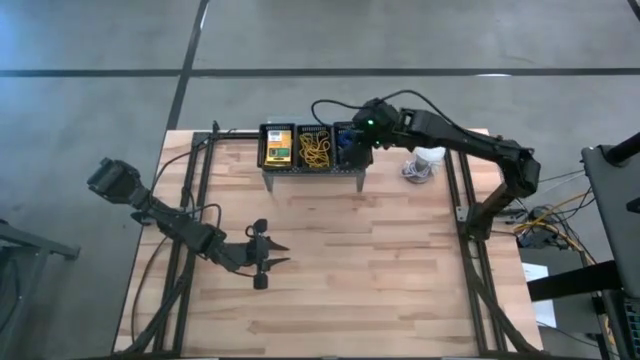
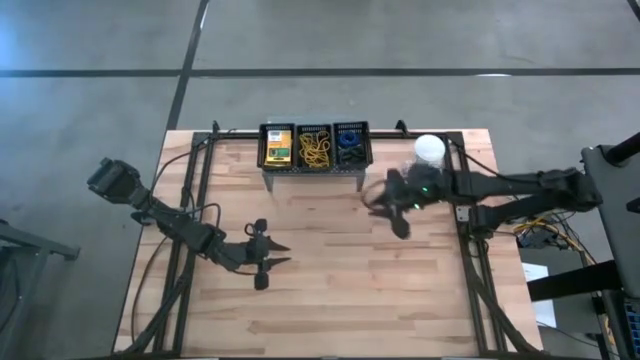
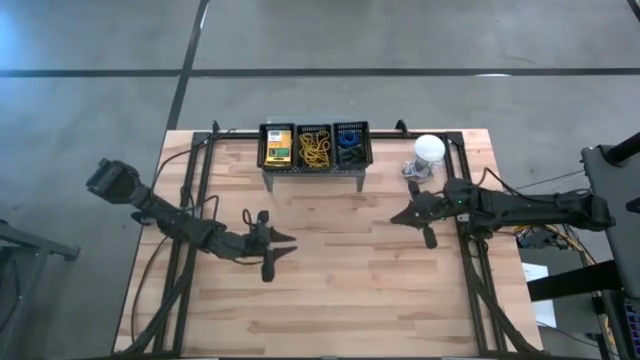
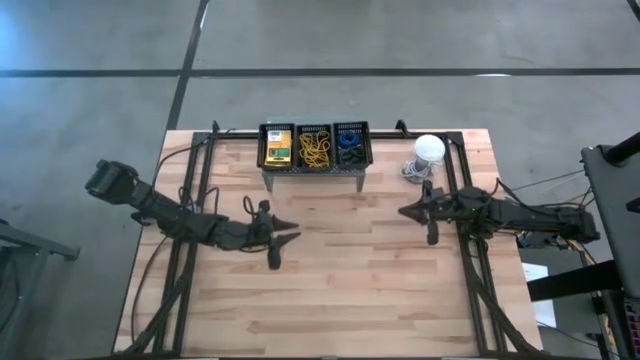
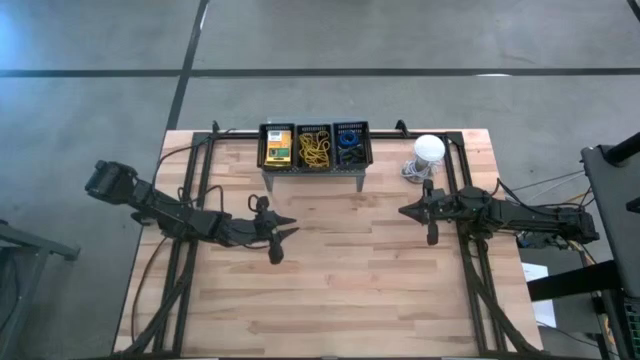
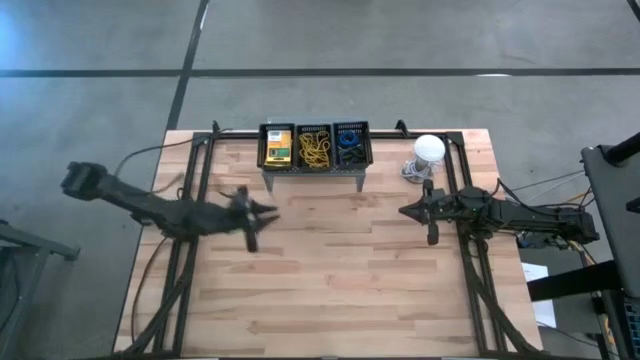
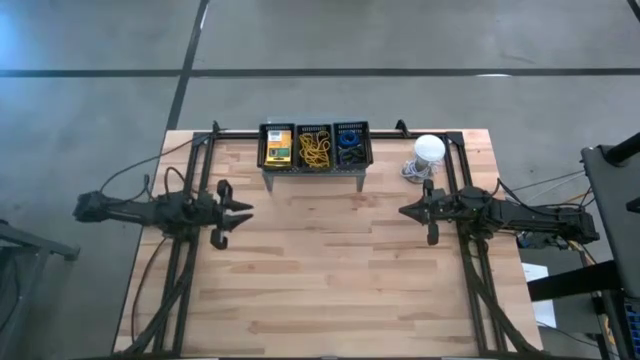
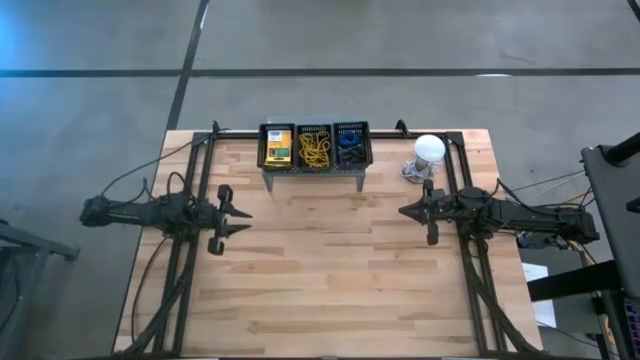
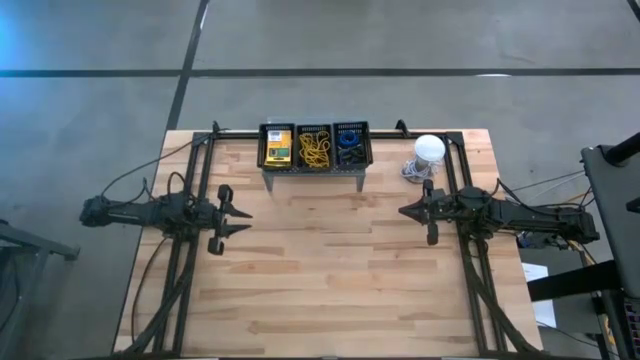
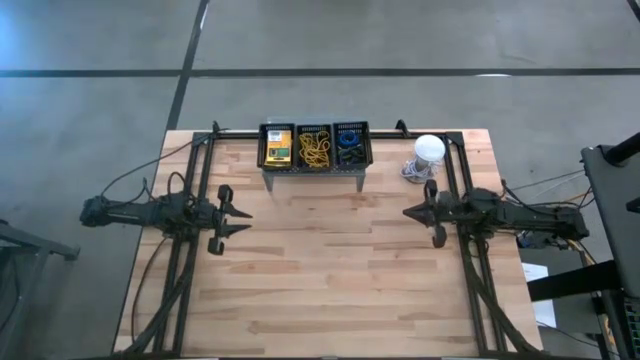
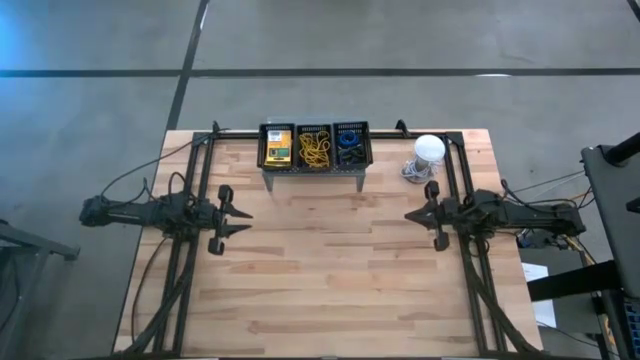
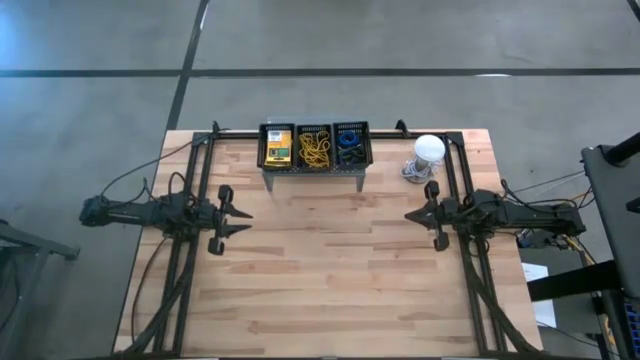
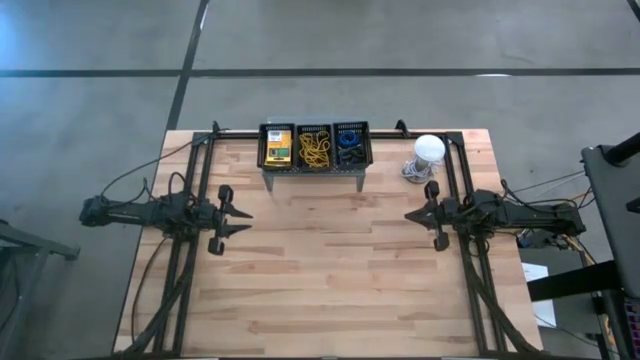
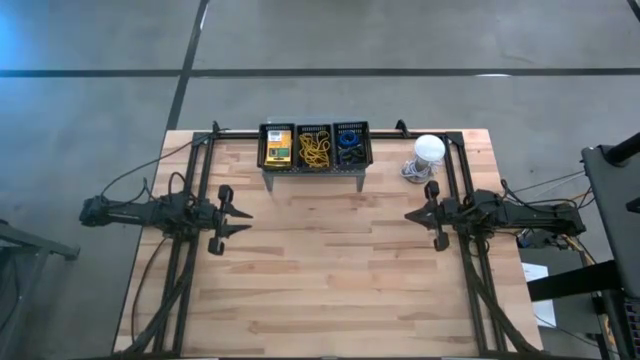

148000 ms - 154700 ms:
Task: Pick & Place Office Desk Supplies
Return to Home Position

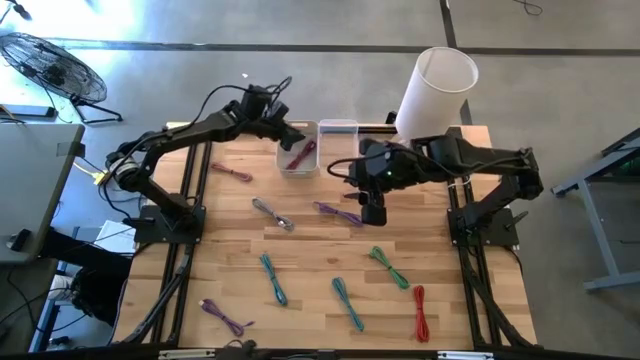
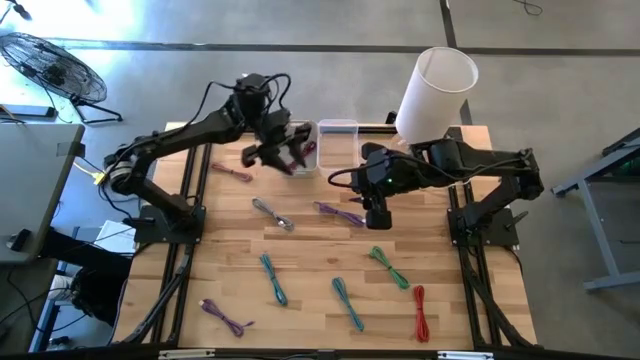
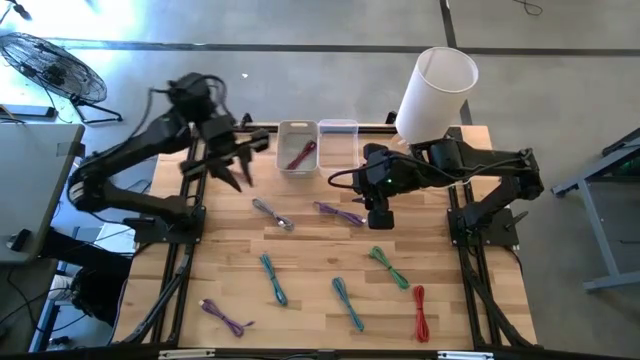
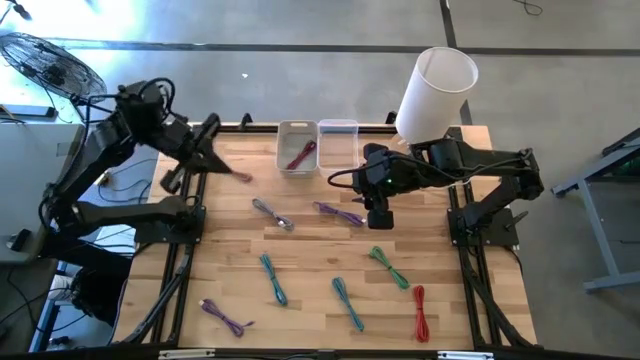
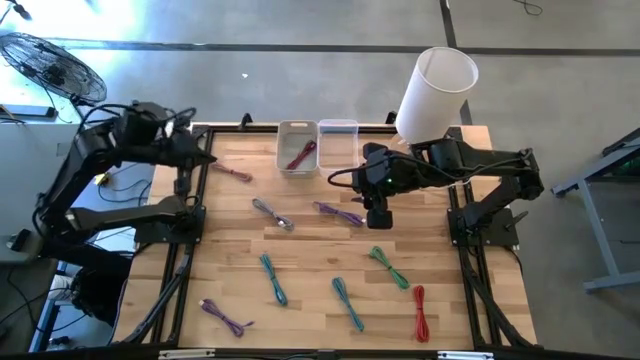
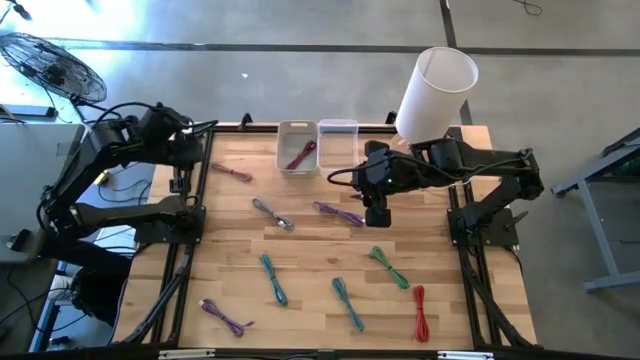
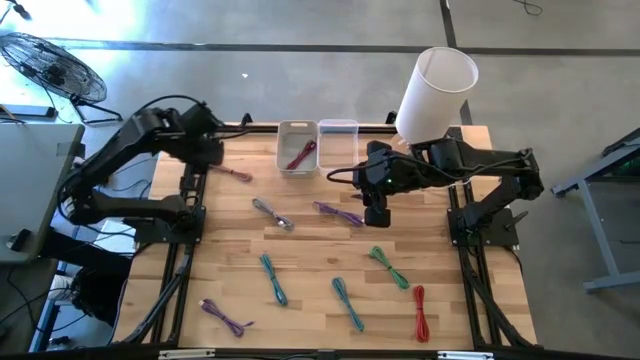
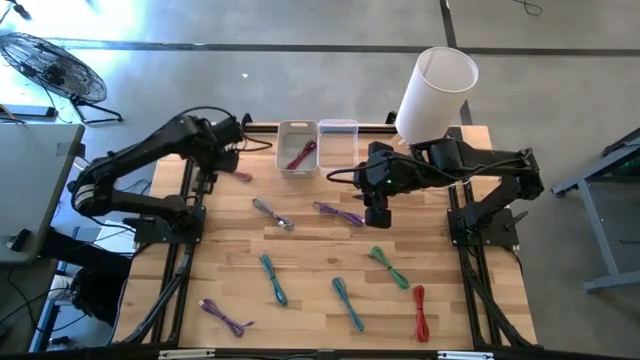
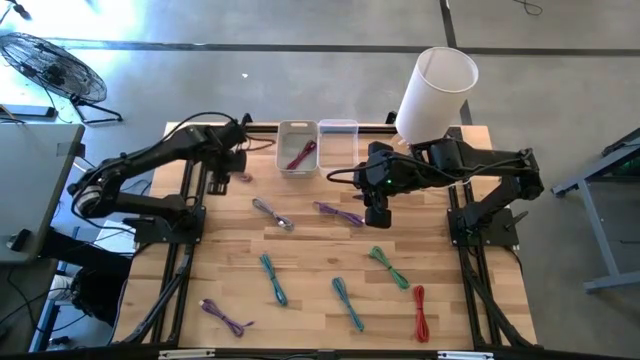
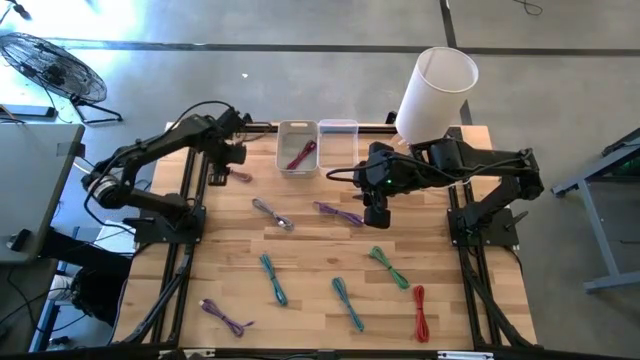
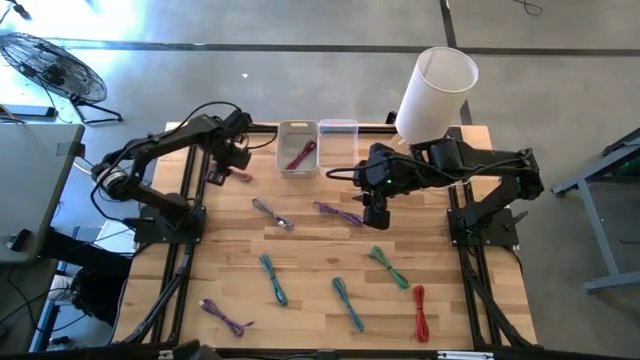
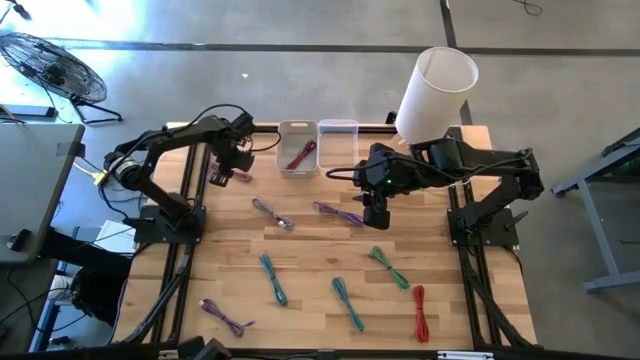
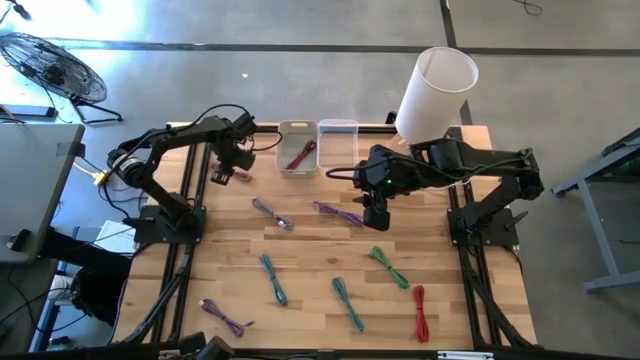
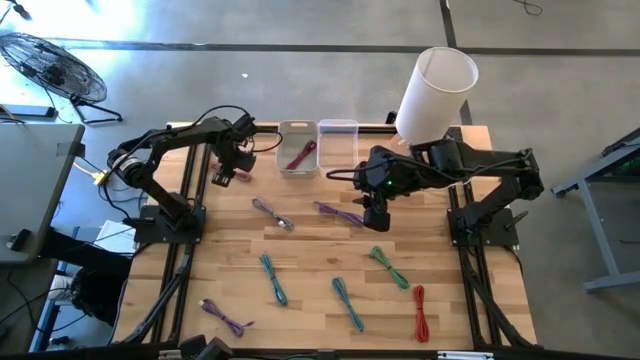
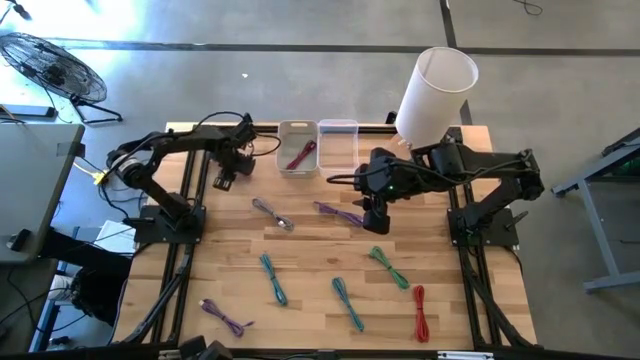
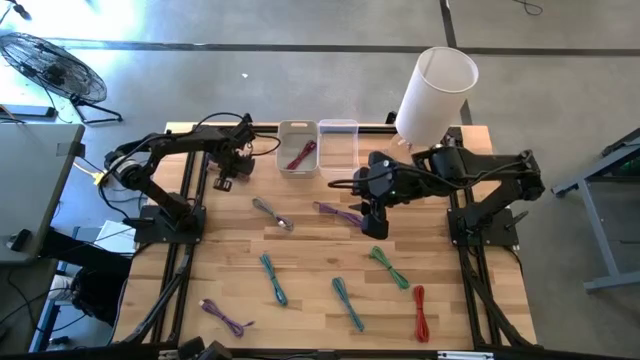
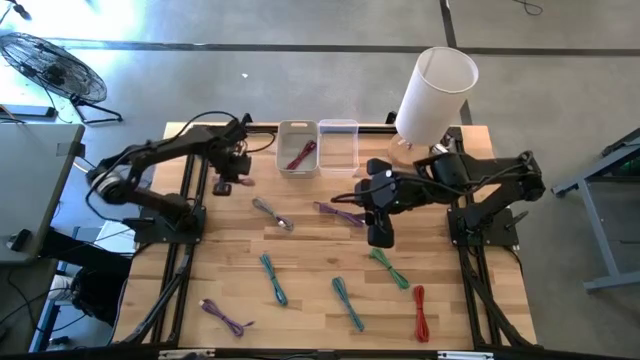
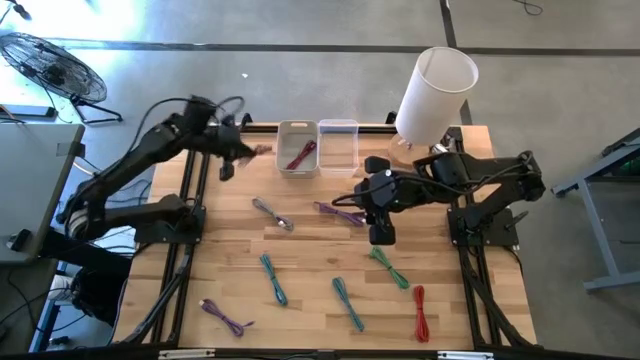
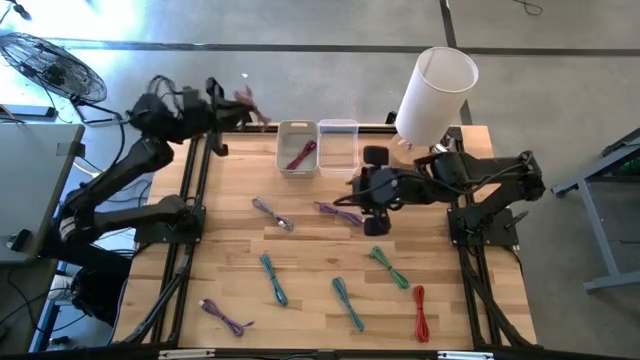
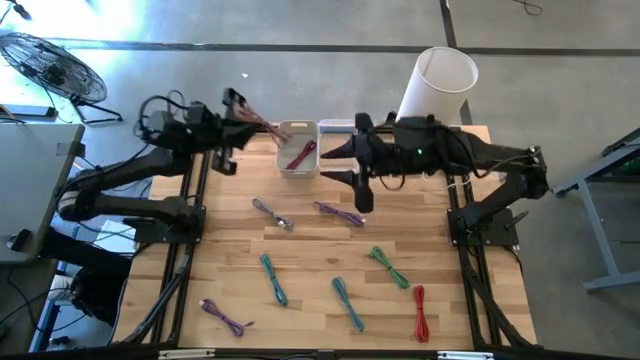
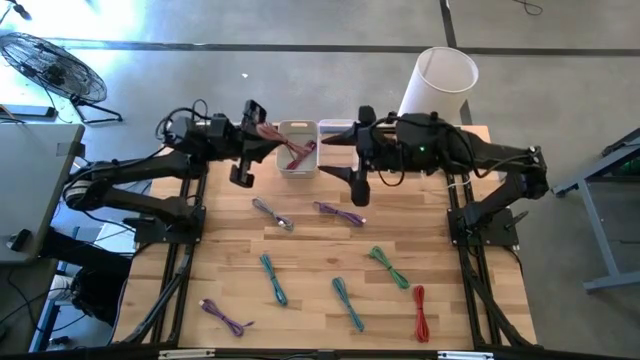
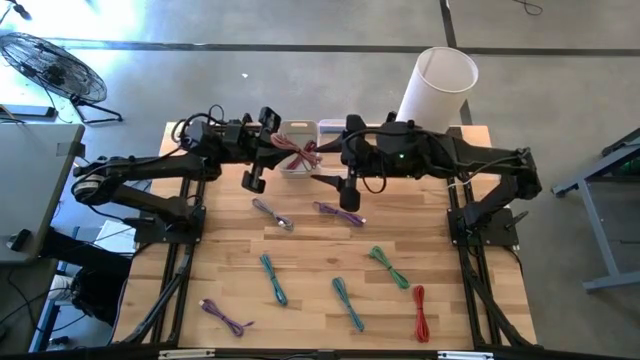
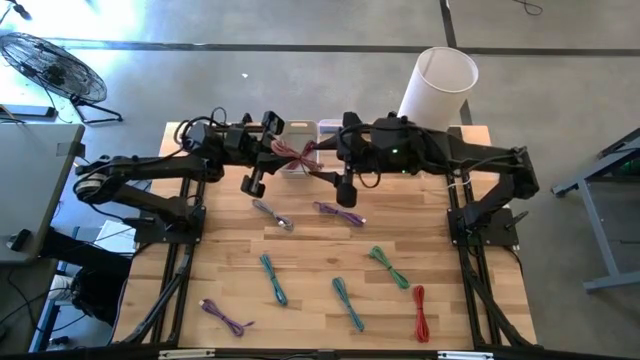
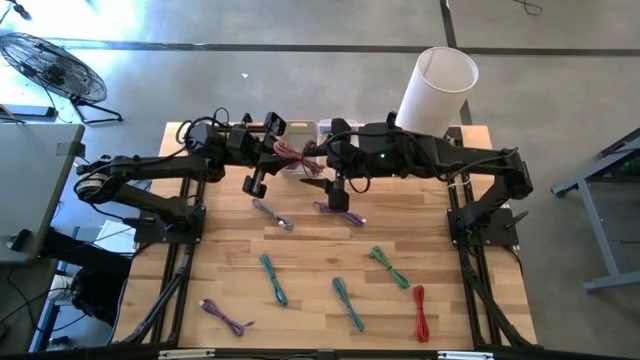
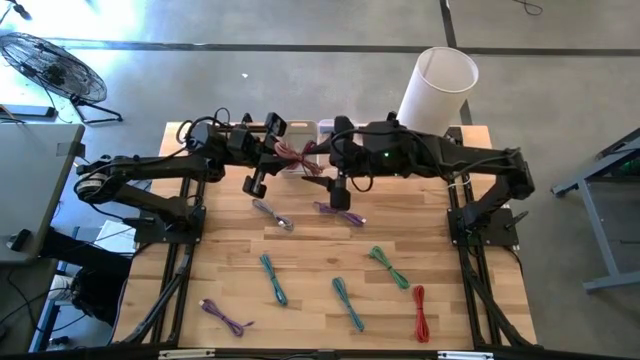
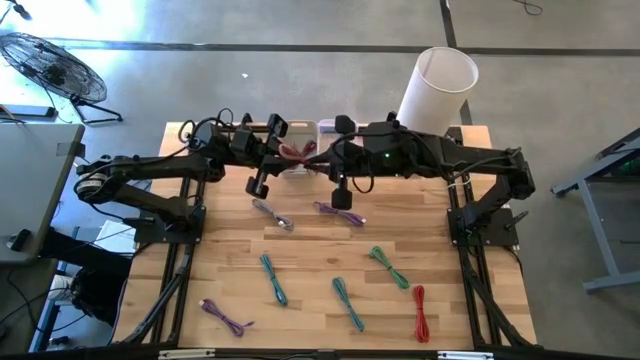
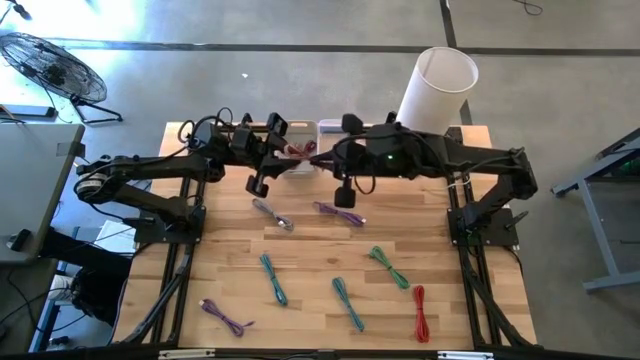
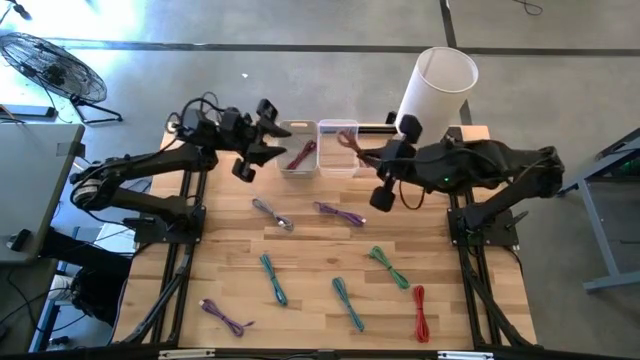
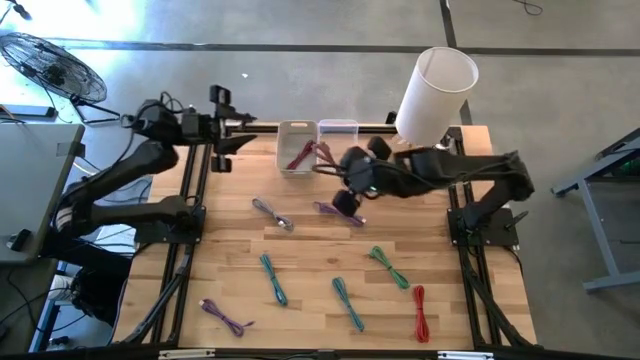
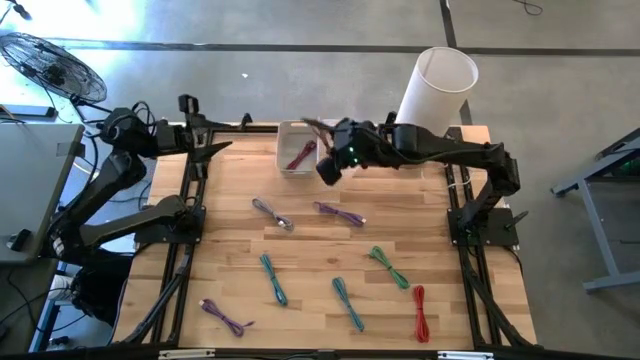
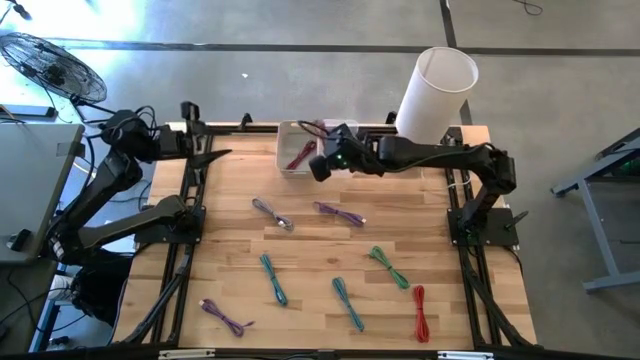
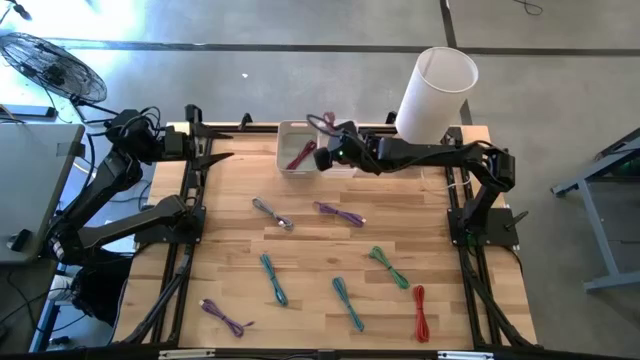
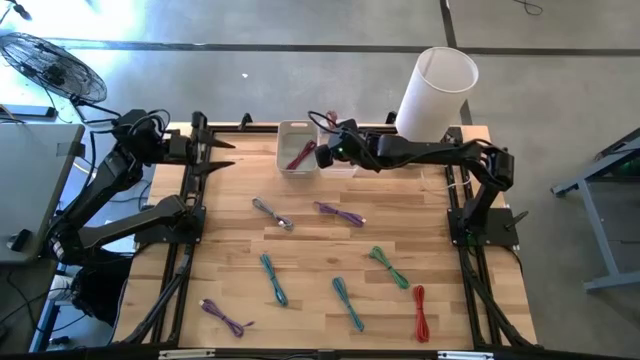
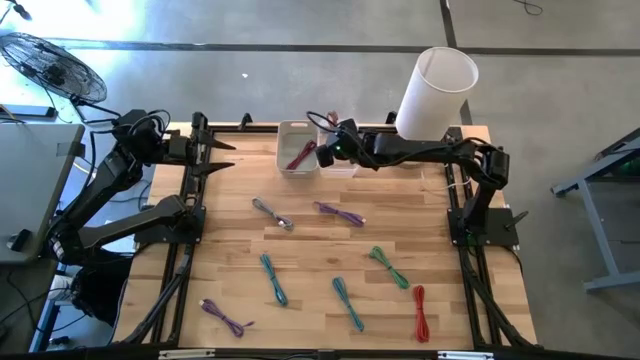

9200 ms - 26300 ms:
Task: Pick & Place USB Port
Put the light pink USB cable into the transparent bin
